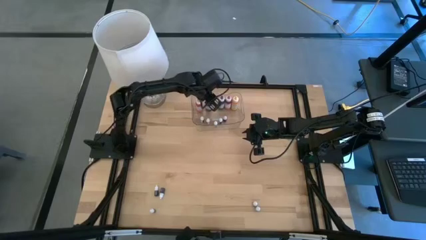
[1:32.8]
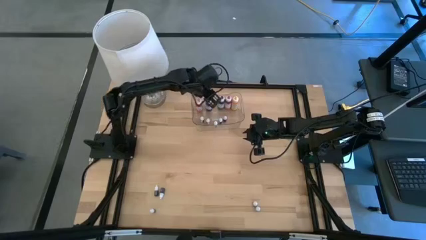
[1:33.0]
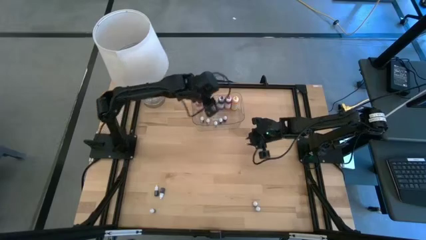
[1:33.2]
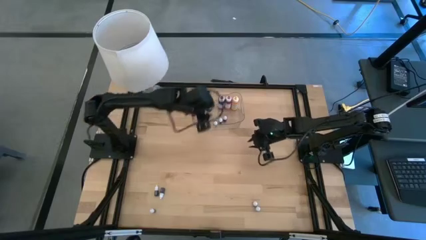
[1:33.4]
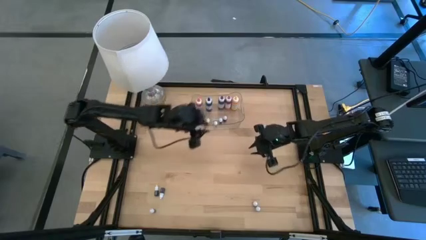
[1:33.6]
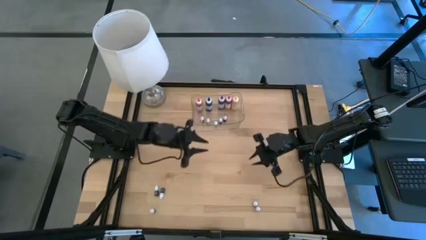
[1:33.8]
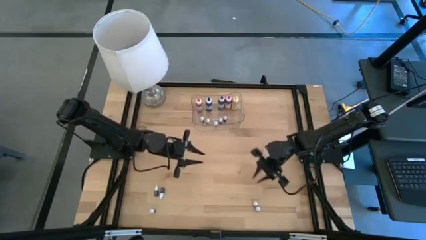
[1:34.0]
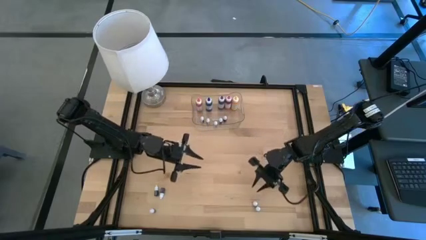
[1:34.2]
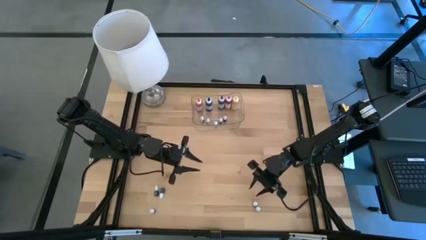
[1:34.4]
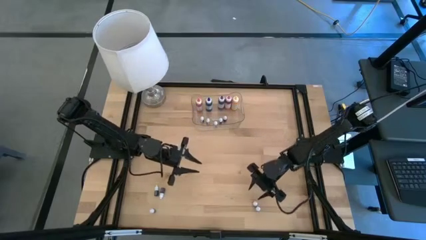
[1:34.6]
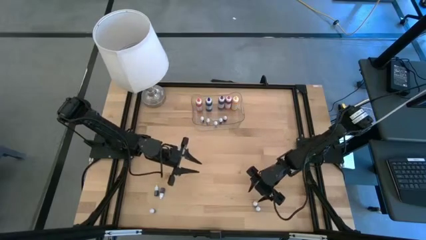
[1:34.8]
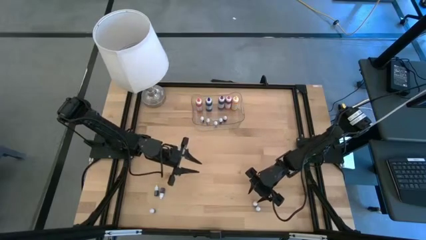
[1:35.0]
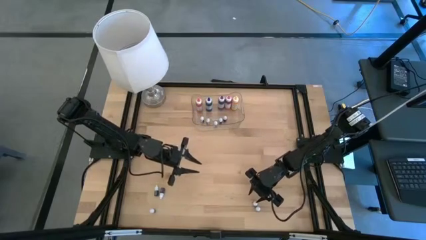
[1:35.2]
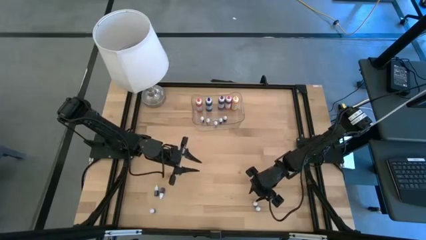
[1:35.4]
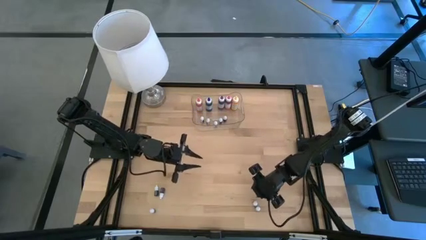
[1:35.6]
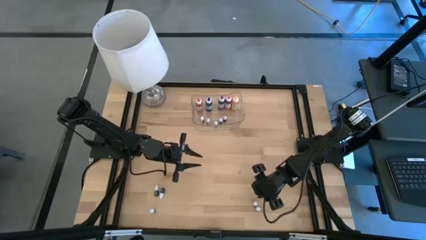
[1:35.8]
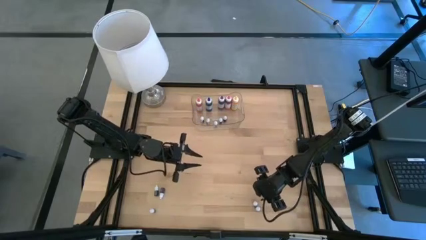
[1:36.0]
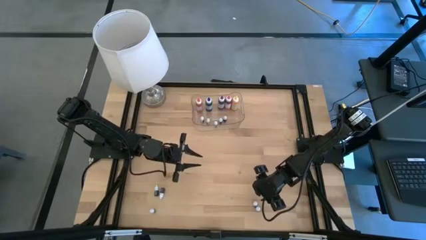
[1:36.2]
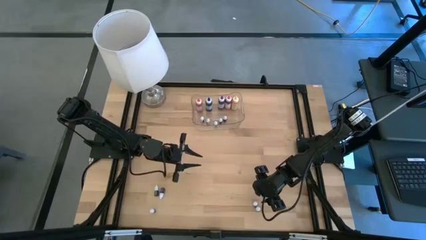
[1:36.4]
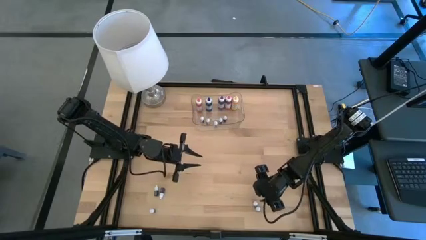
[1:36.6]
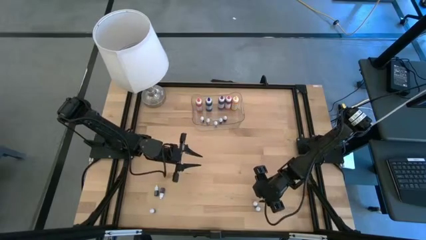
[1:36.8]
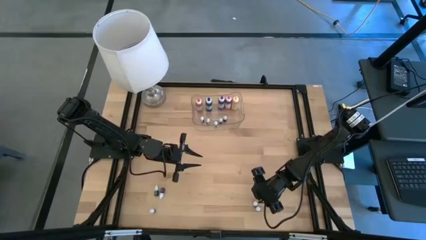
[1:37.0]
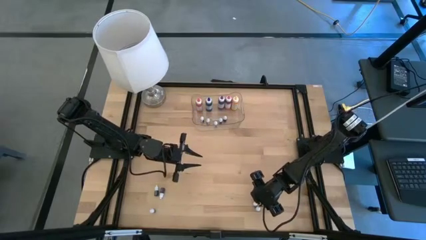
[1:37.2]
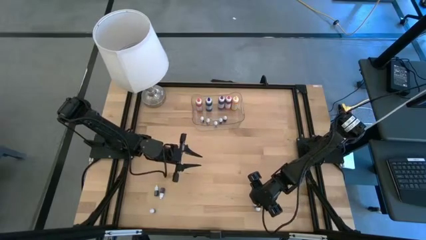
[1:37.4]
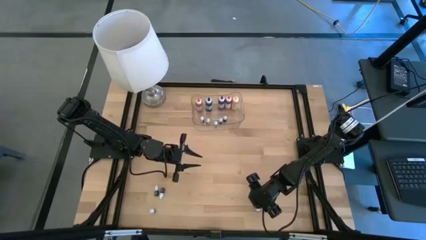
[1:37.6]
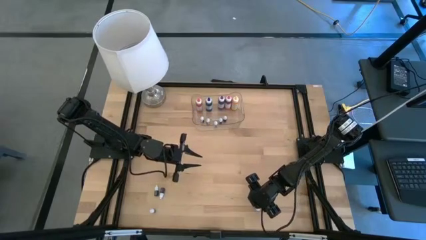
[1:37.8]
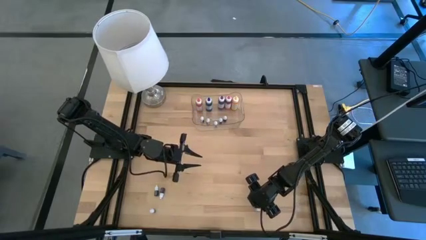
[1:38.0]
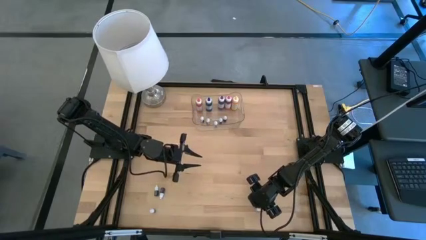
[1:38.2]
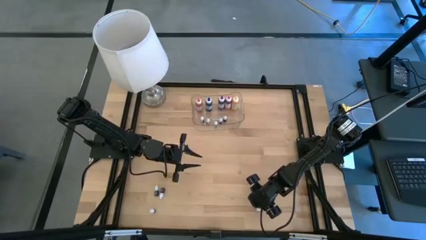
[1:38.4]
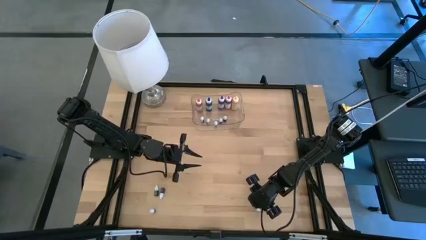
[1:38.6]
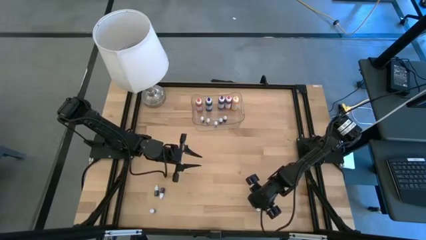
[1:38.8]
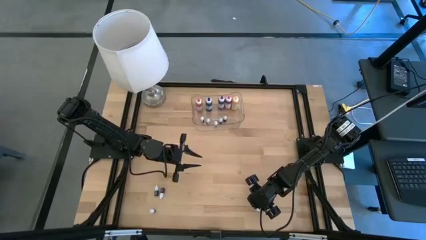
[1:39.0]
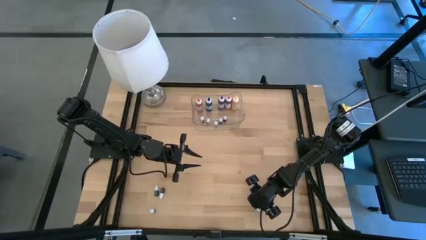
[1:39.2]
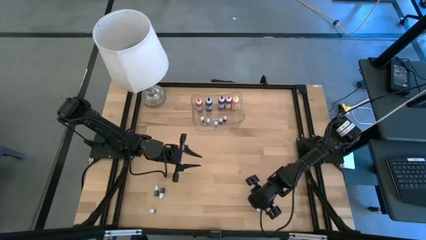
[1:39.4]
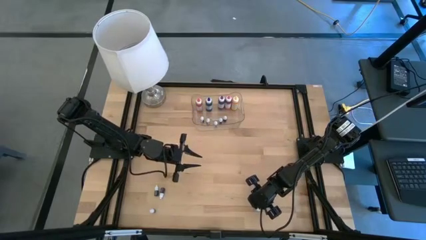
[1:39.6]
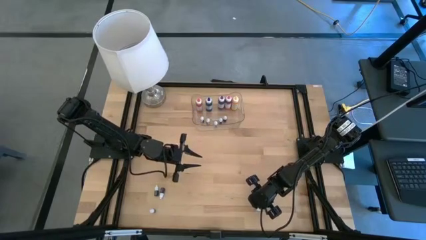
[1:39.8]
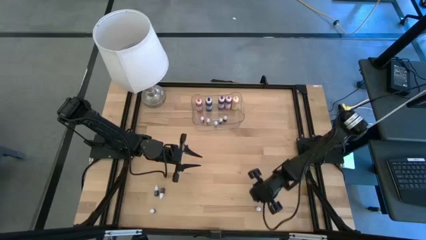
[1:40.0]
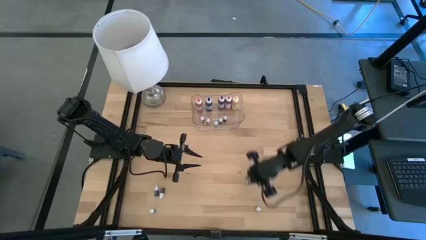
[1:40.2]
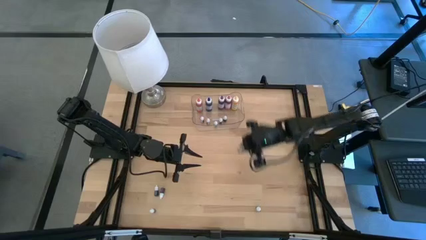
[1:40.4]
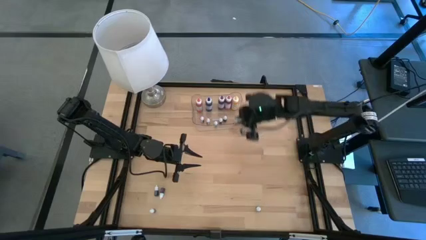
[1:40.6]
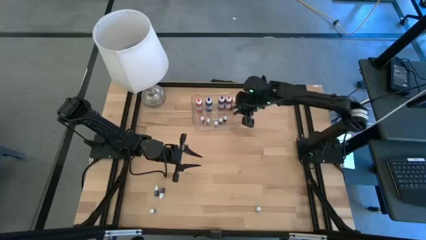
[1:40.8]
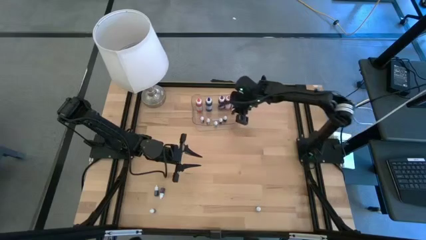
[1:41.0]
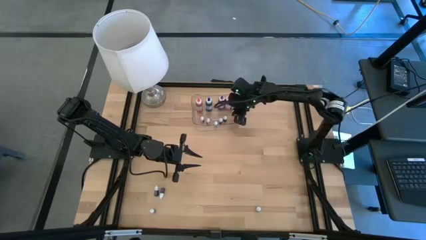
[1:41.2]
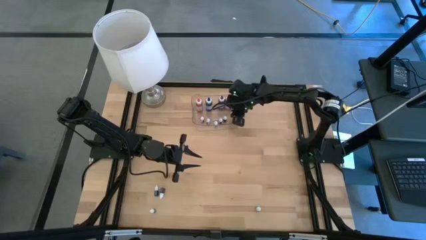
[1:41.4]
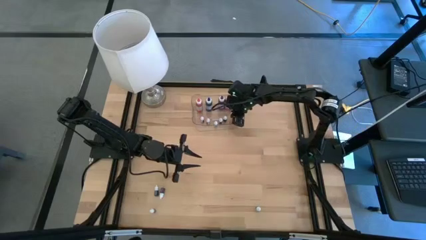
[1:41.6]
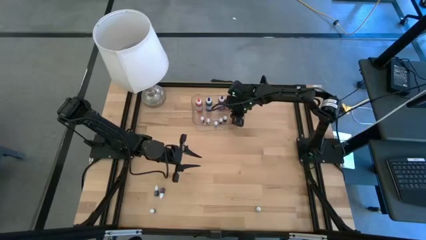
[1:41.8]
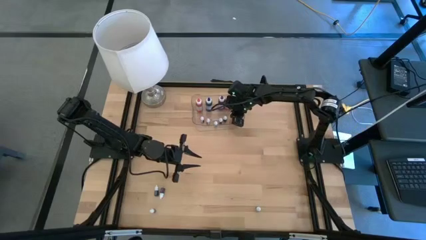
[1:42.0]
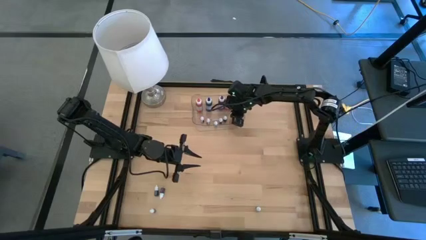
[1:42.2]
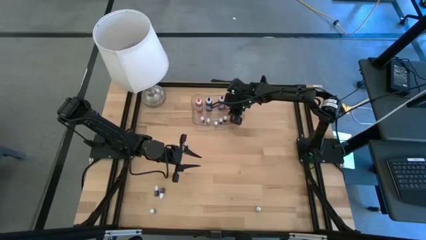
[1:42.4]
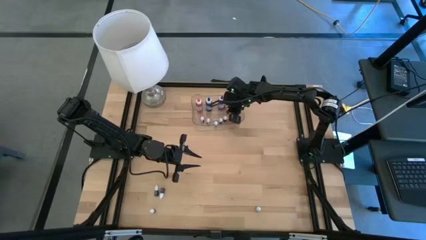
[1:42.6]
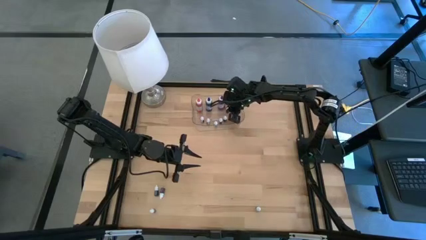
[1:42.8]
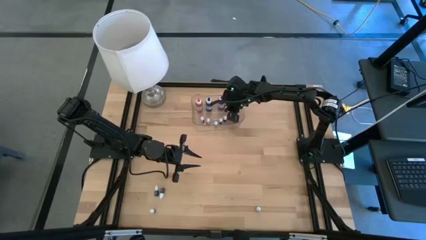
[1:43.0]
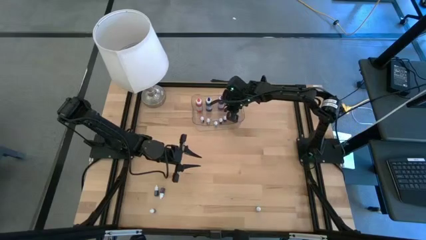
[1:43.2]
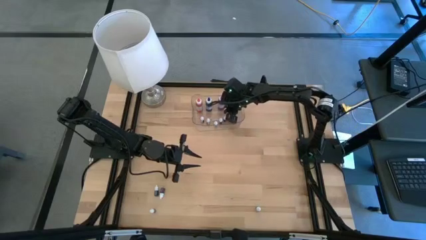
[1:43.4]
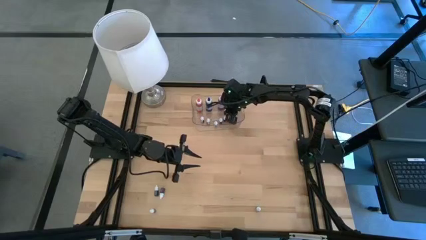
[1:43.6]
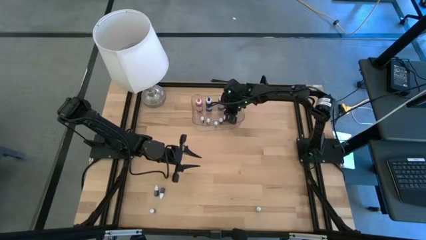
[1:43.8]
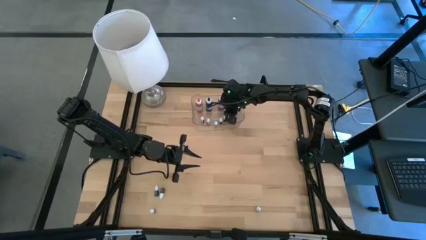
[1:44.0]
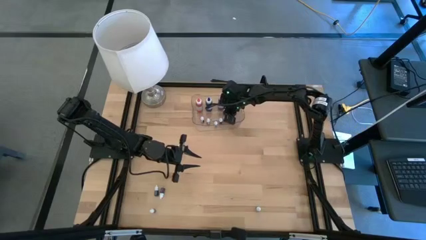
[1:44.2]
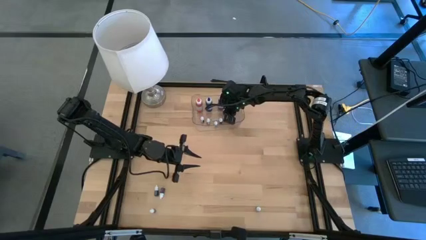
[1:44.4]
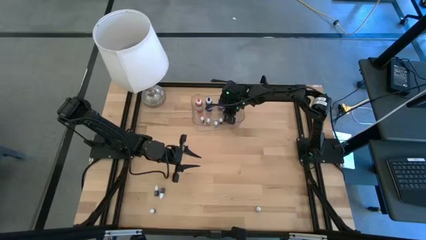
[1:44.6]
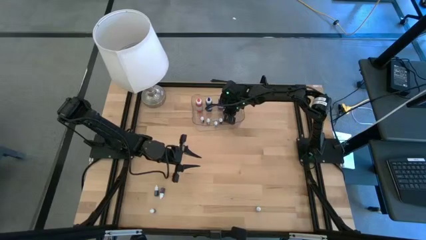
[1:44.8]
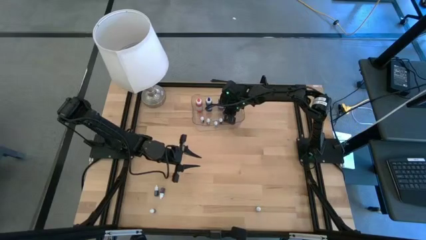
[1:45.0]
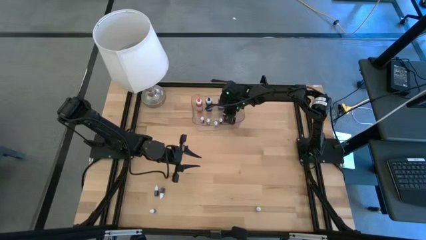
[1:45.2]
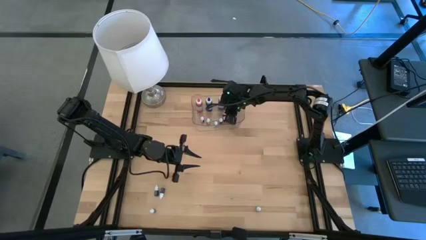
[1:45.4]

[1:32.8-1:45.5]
Task: Pick & Place food coloring
Put the small orange food coloring bottle into the transparent bin

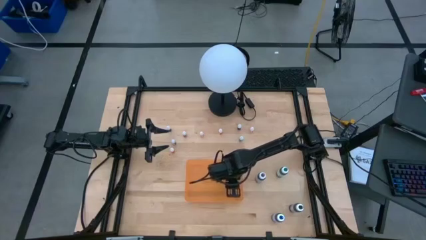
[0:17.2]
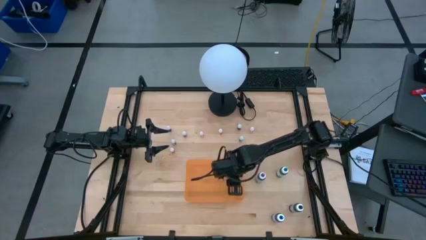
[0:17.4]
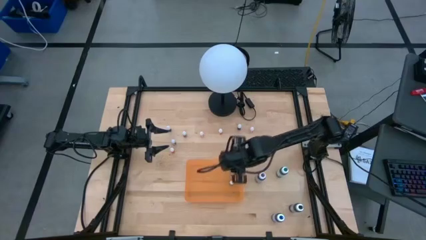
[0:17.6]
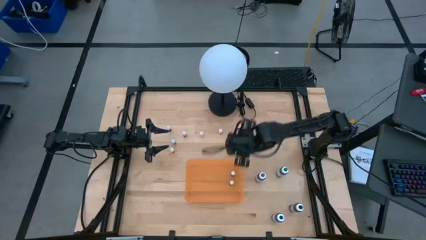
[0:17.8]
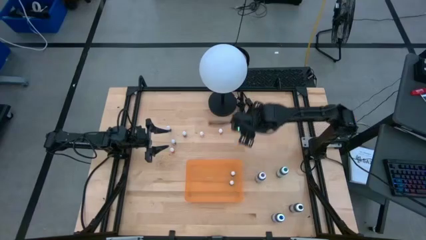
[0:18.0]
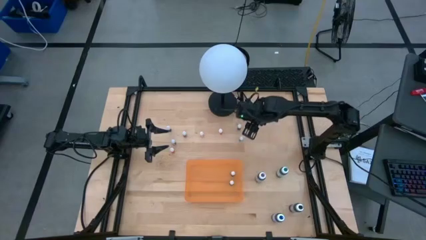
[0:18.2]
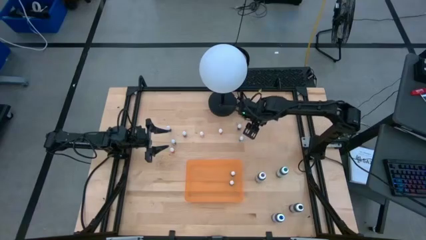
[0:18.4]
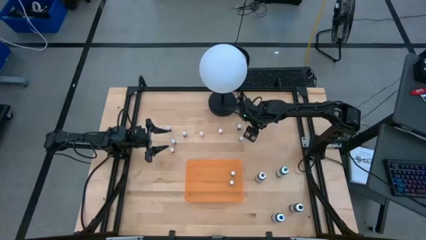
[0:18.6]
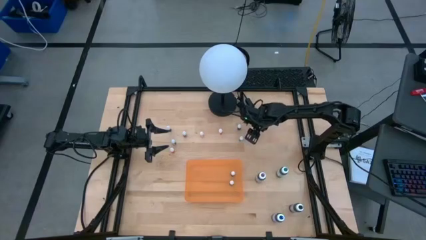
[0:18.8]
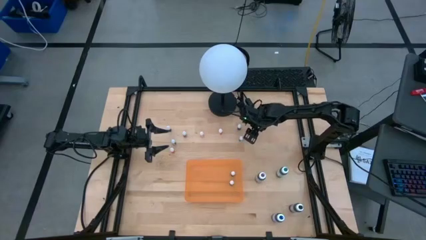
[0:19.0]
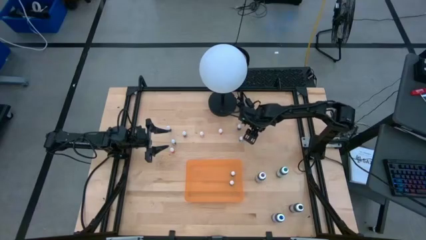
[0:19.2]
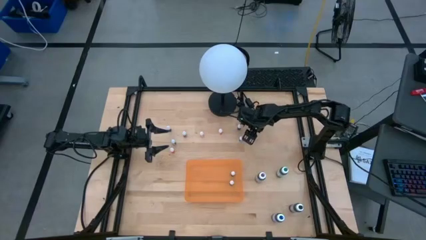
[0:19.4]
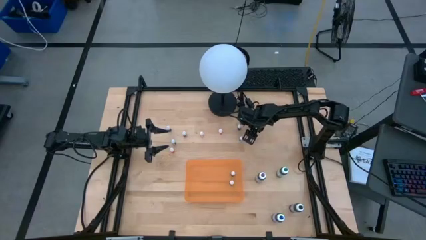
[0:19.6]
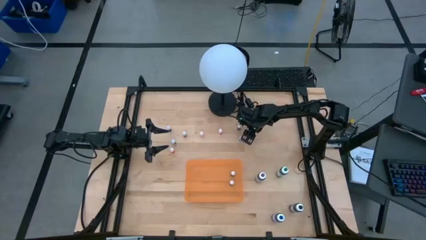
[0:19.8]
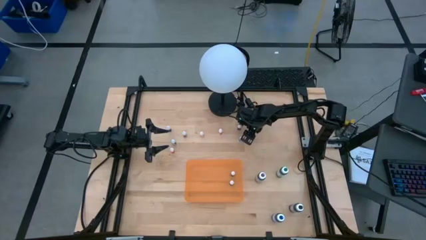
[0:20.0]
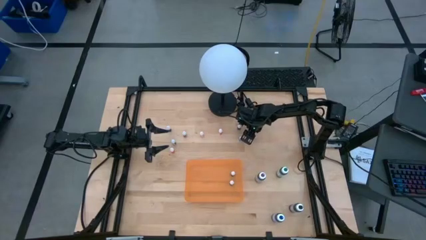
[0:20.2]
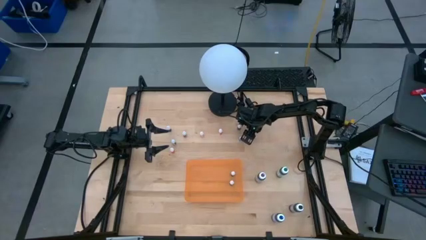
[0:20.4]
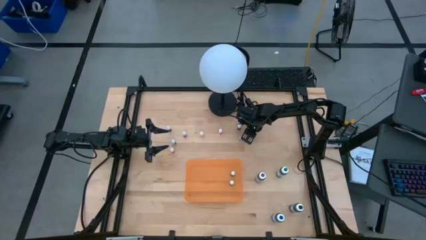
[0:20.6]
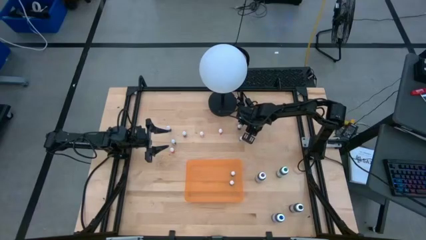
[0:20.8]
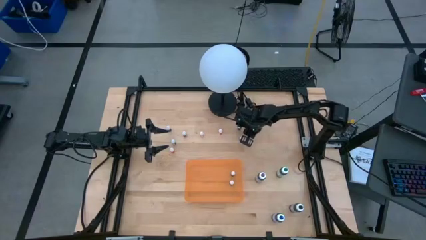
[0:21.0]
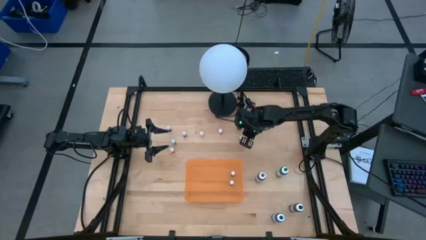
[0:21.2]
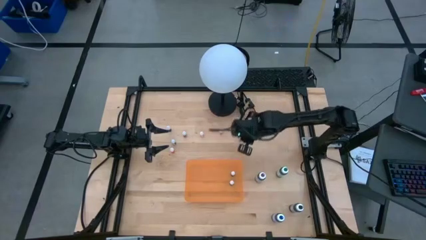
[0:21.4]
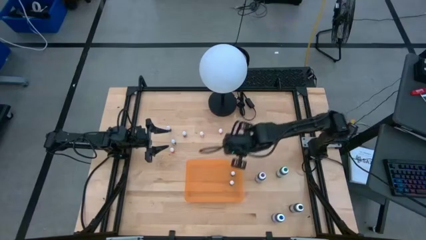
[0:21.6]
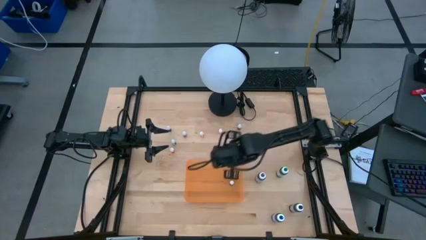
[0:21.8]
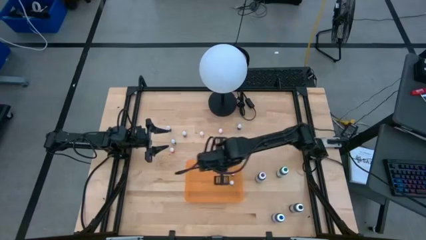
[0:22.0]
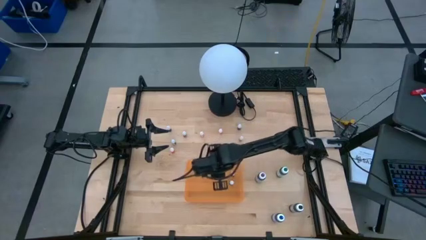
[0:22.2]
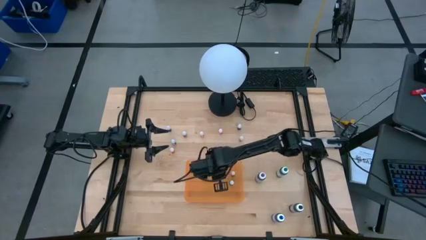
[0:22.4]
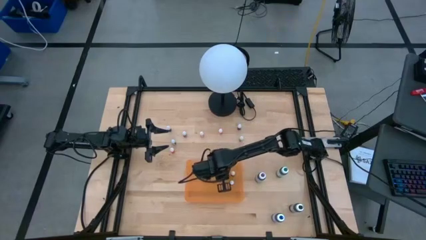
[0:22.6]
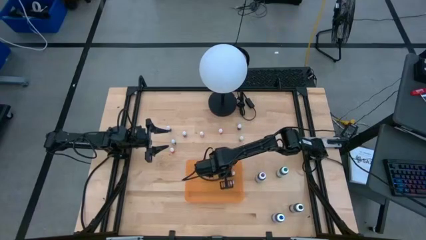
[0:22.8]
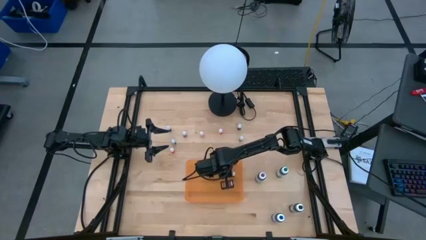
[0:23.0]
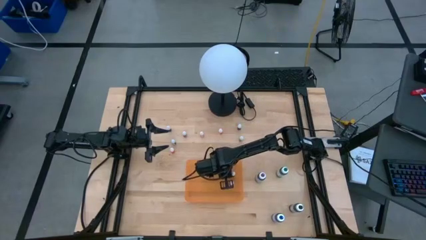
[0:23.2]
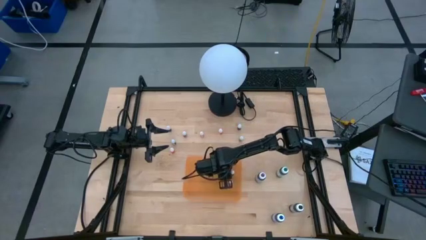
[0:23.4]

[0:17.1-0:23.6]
Task: Pick & Place food coloring
Put the small orange food coloring bottle into the orange container
